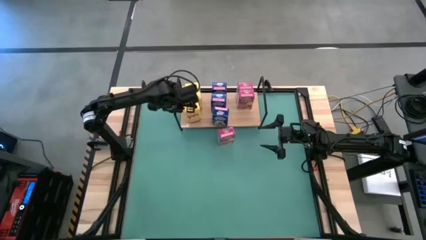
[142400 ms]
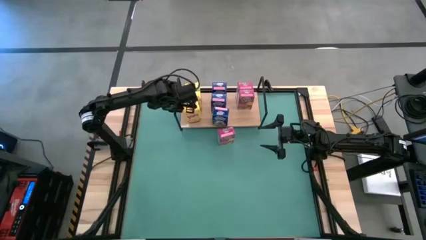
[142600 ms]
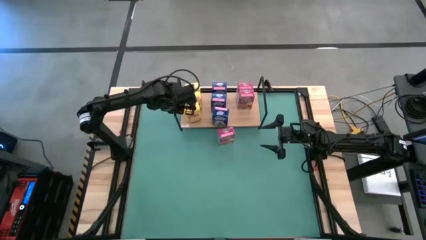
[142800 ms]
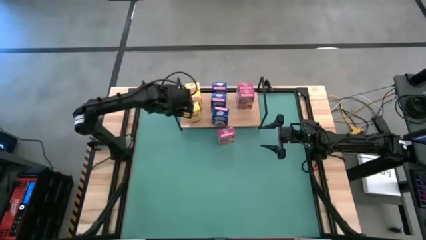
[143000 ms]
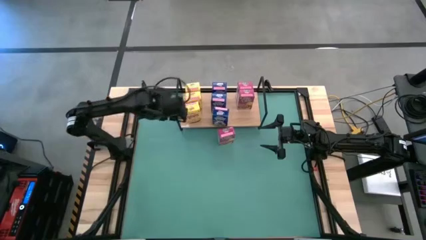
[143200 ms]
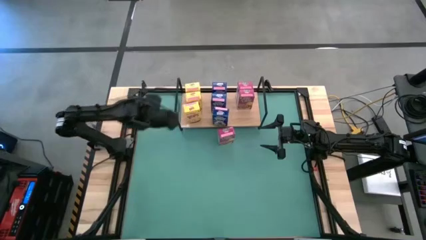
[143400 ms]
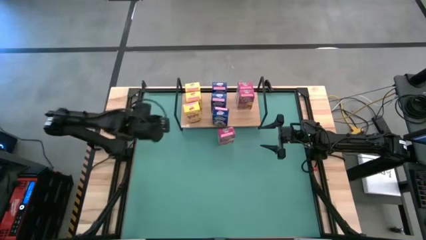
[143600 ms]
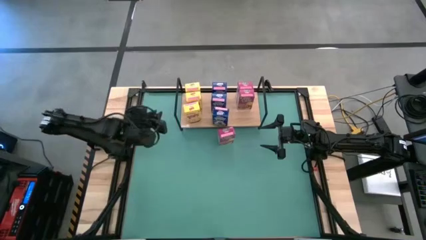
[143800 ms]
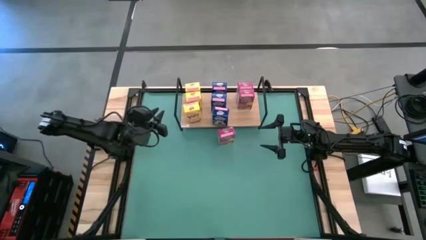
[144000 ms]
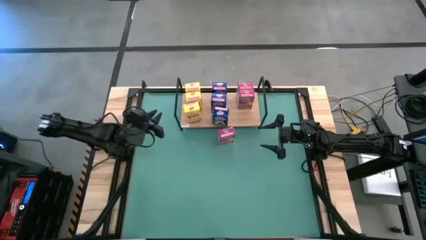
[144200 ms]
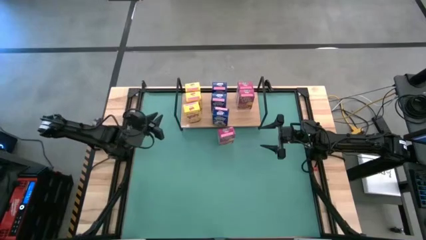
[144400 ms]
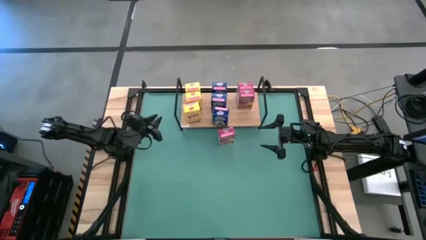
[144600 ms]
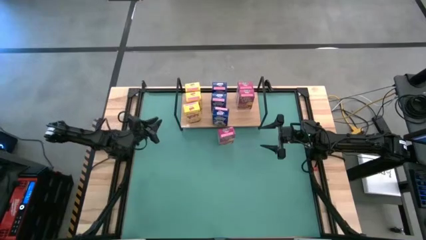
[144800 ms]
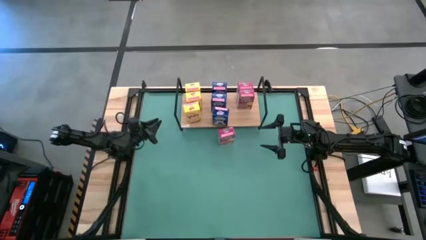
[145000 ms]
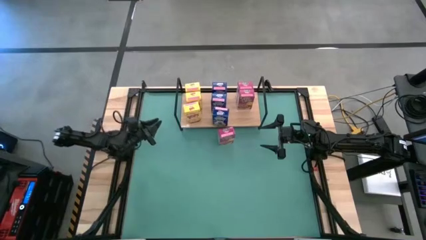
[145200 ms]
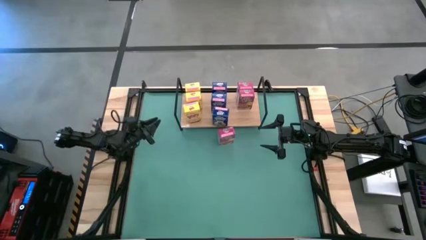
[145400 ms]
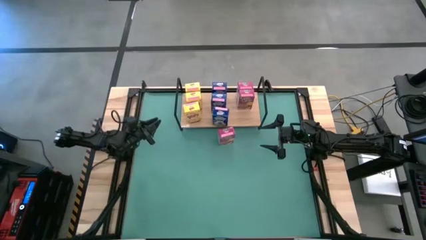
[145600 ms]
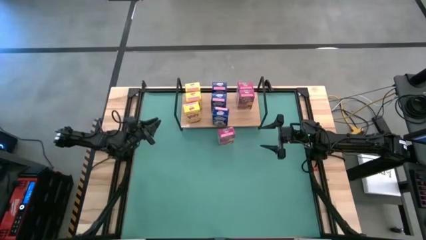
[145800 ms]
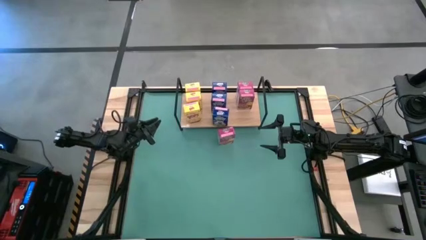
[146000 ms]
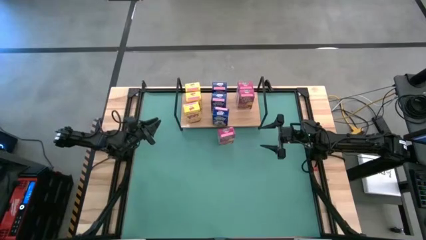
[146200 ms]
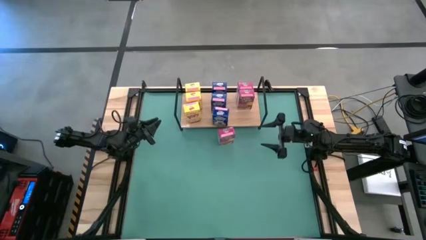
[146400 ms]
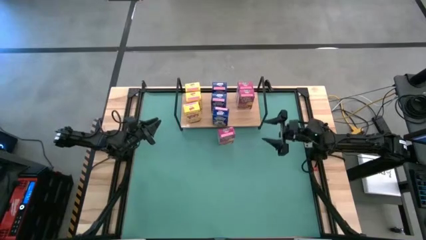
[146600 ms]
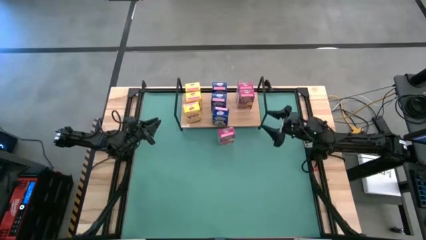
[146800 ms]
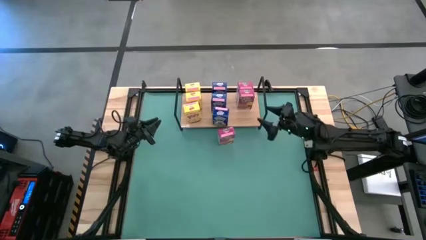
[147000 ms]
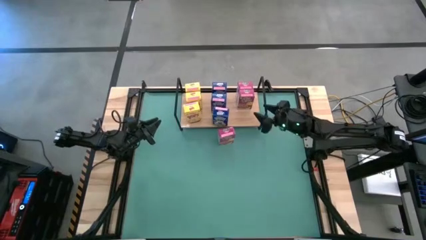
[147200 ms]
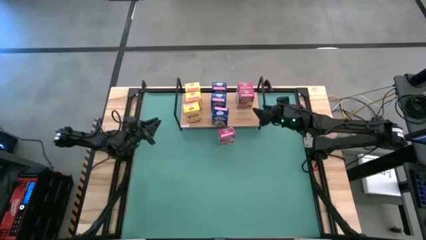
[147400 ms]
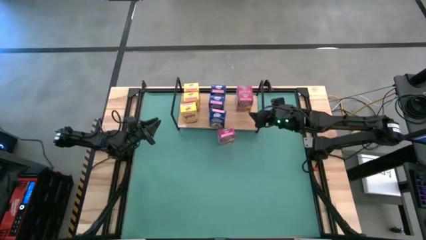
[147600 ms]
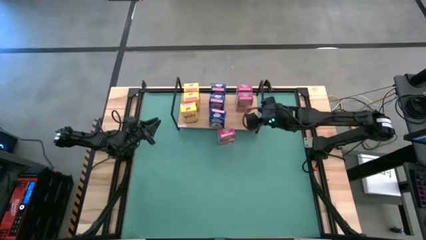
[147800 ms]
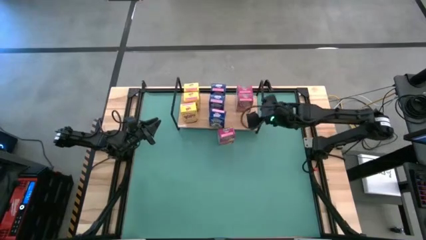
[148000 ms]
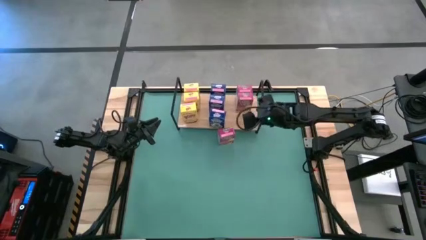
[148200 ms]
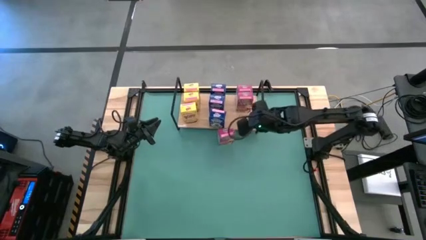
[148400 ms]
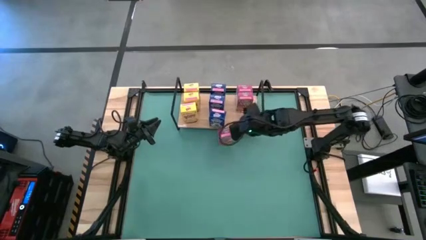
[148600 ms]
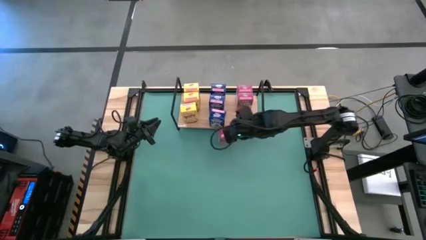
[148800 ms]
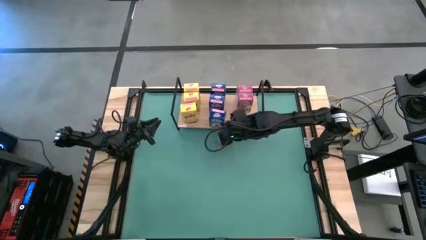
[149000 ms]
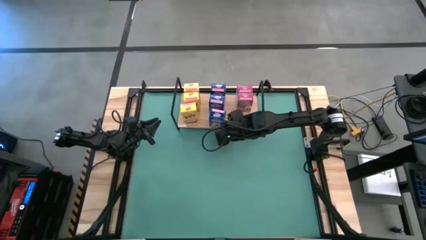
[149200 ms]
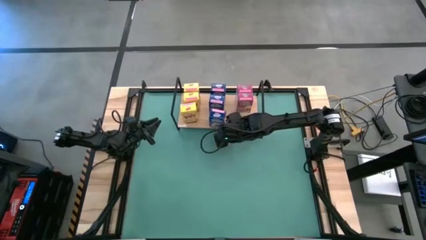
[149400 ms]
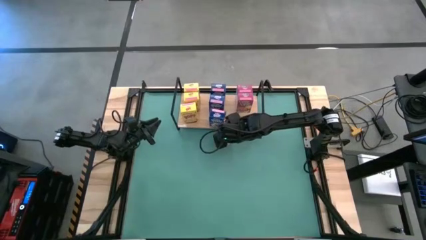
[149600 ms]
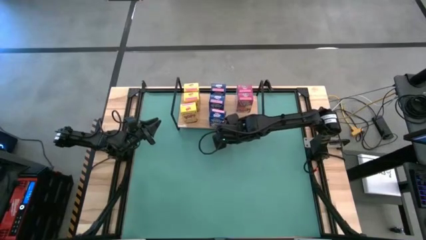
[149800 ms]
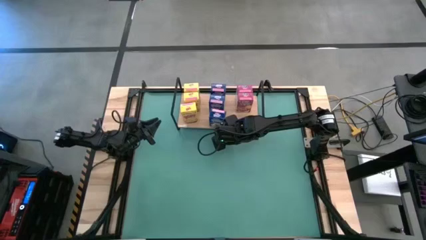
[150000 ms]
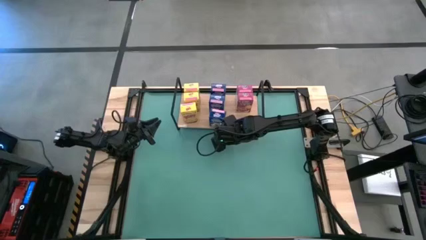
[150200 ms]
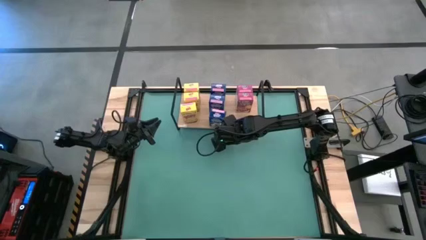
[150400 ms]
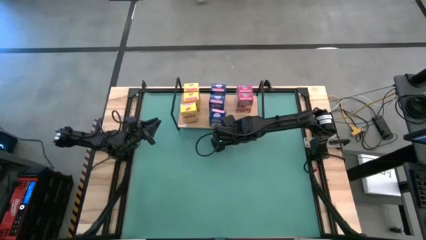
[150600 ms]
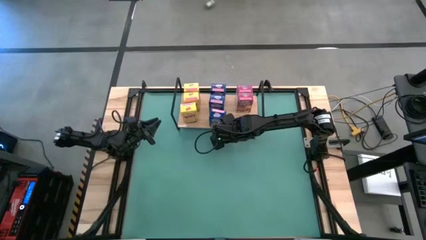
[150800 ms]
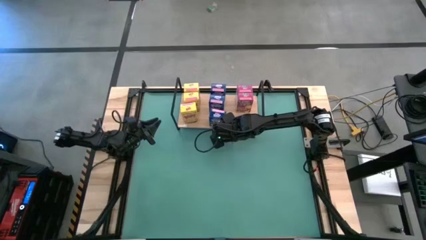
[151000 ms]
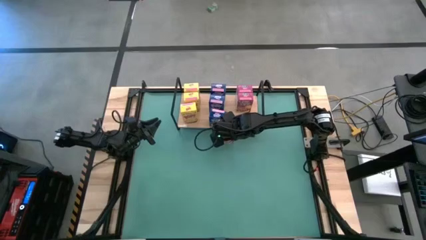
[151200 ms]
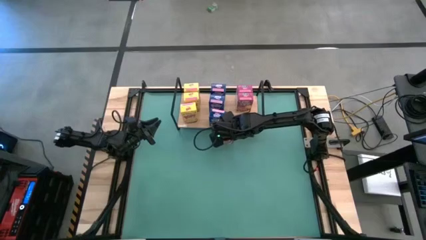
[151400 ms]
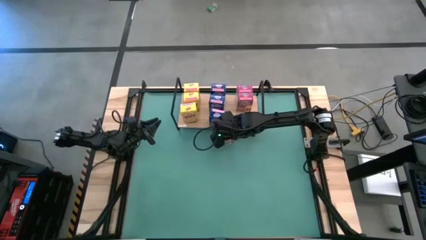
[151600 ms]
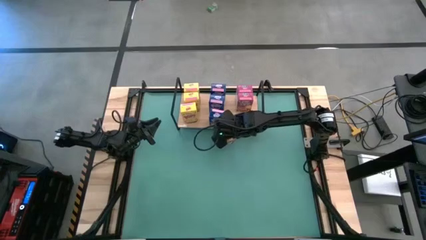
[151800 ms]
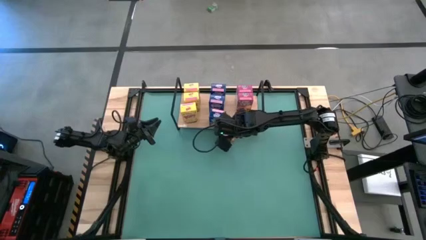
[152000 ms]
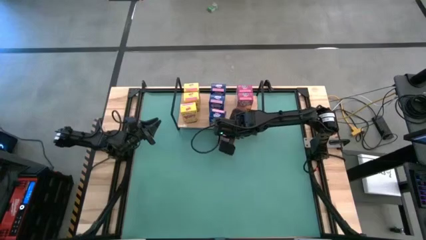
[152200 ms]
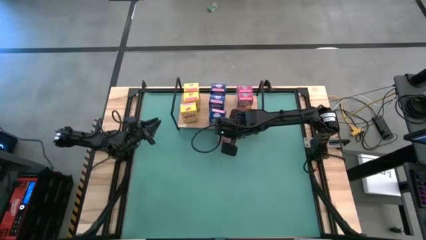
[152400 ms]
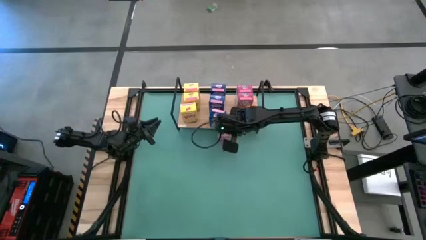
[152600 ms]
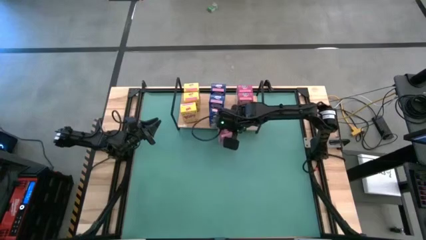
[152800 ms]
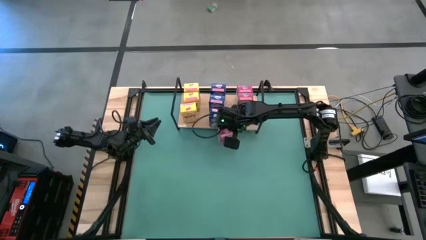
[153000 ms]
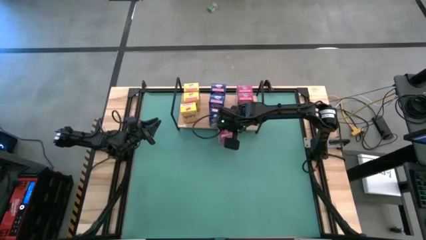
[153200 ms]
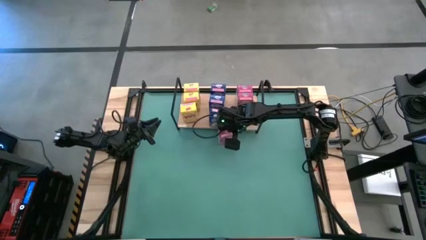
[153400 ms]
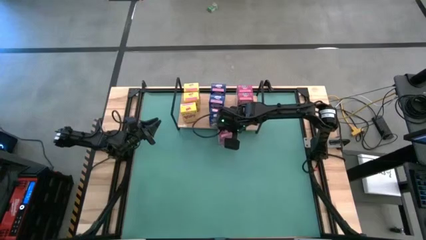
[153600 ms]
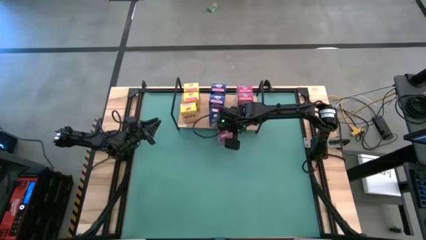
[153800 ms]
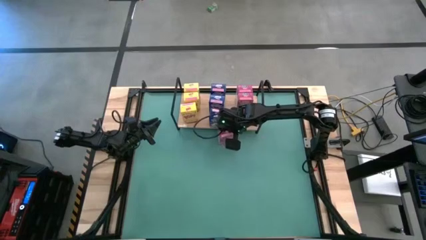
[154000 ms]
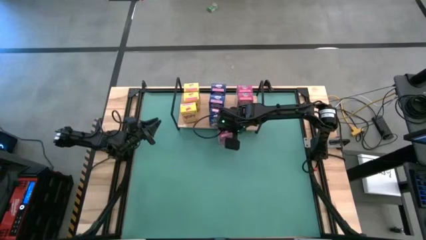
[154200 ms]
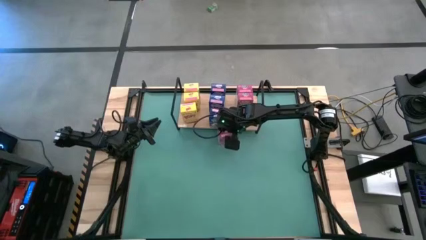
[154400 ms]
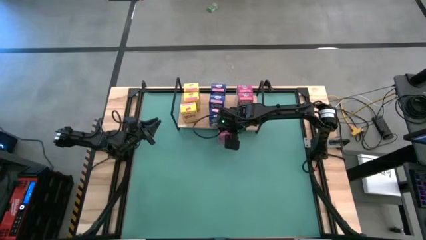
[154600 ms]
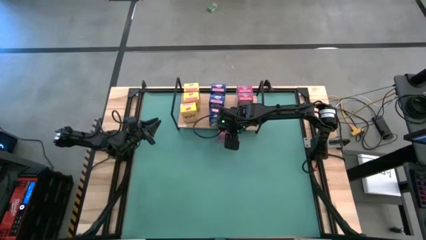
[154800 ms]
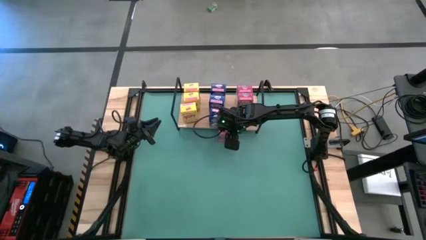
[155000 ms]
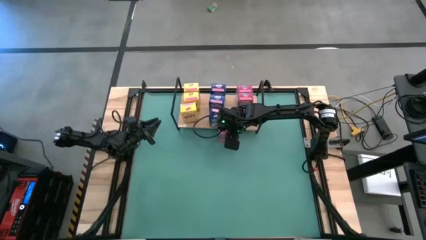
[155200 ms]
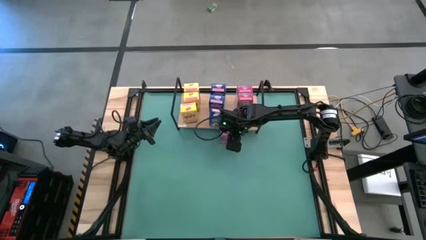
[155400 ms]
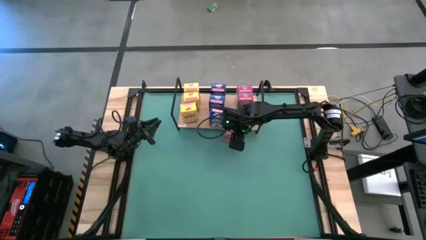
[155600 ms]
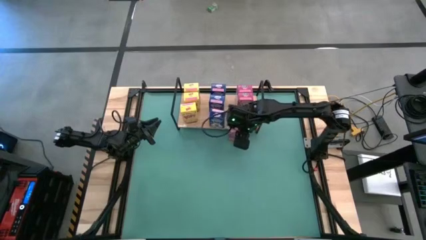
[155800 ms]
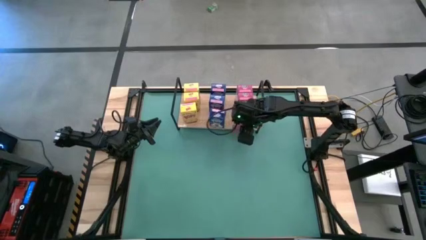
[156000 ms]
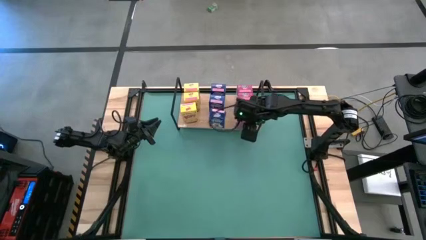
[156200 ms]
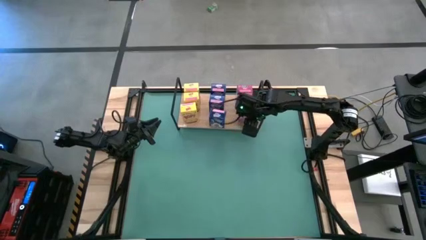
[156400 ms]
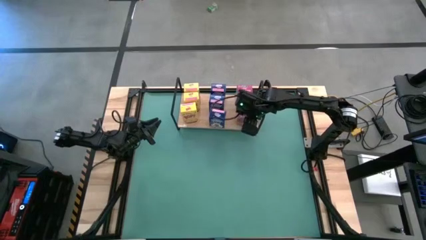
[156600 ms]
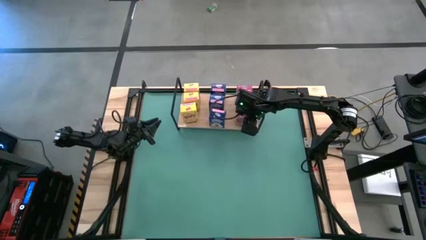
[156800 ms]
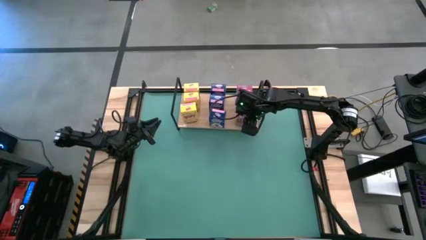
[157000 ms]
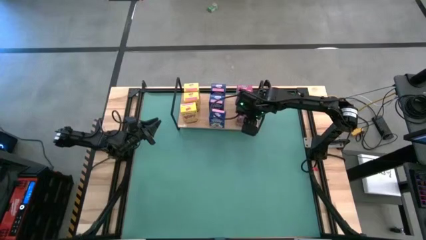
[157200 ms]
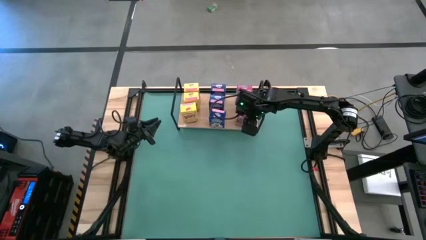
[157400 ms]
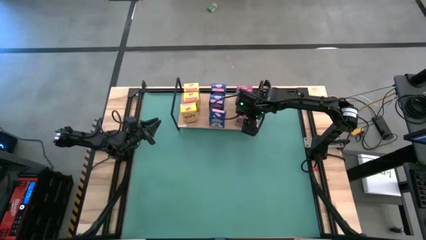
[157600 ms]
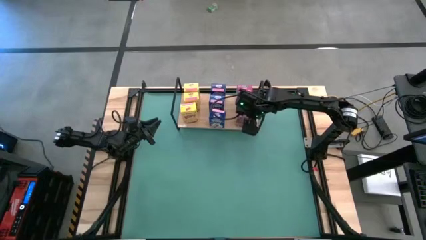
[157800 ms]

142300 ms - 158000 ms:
Task: Stack cereal on shelf
Put the pink cereal box on the shelf aligned with the other pink cereal boxes
